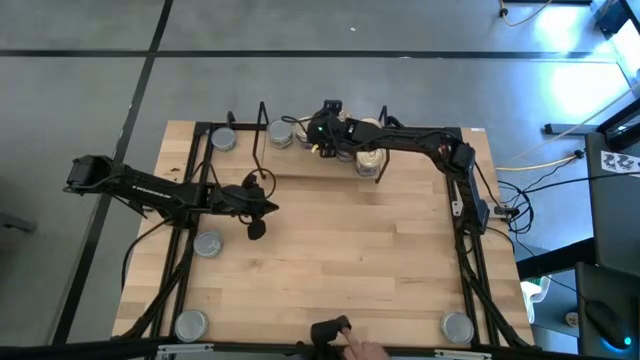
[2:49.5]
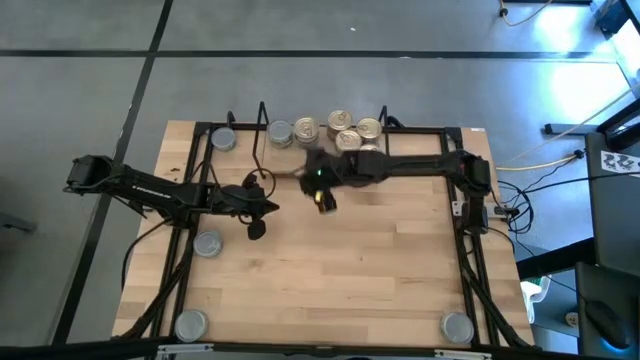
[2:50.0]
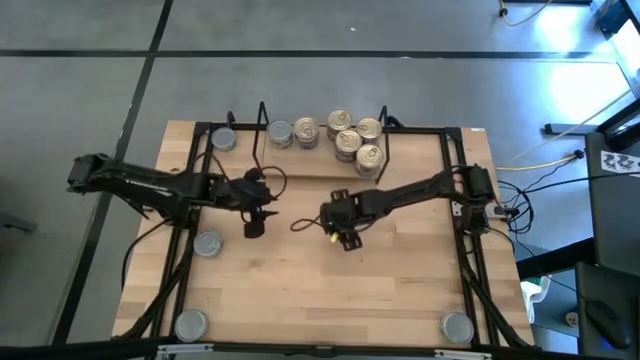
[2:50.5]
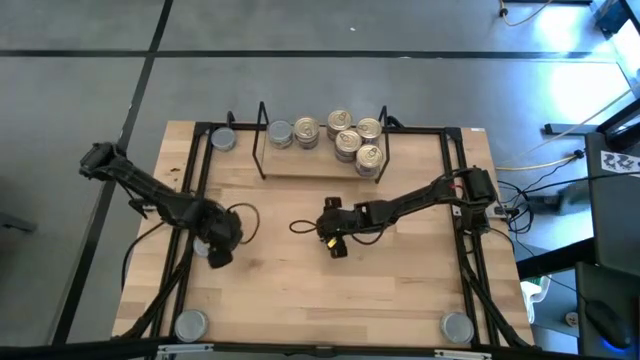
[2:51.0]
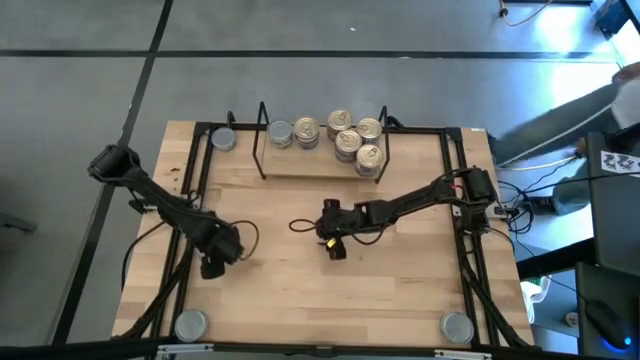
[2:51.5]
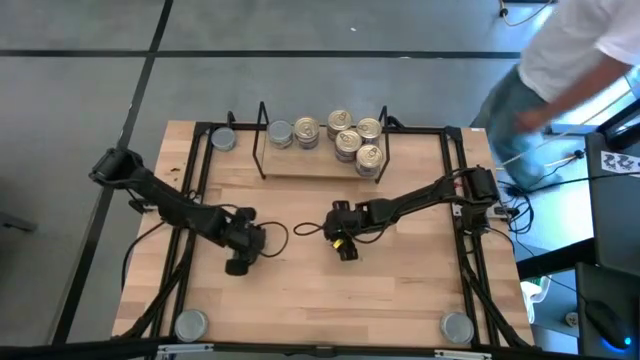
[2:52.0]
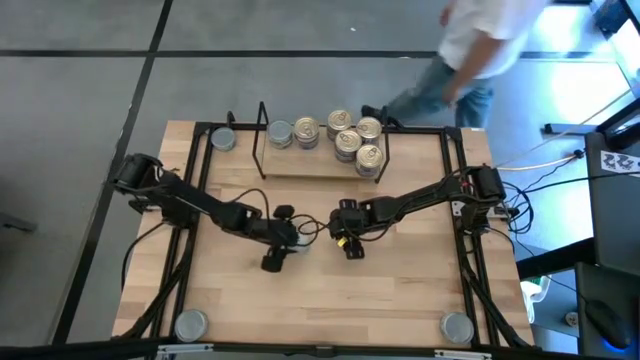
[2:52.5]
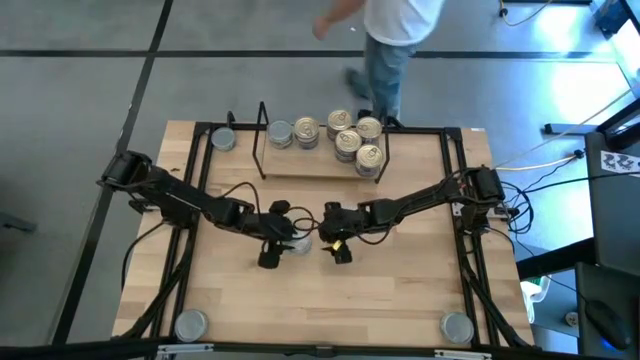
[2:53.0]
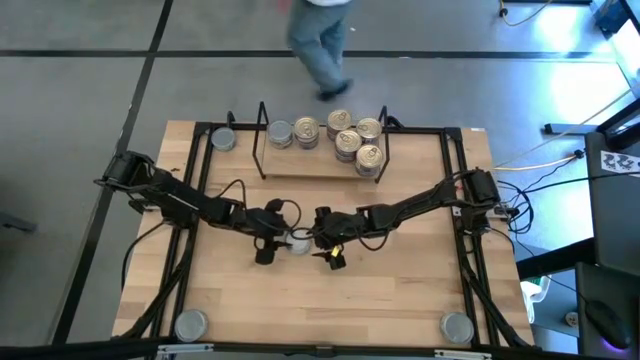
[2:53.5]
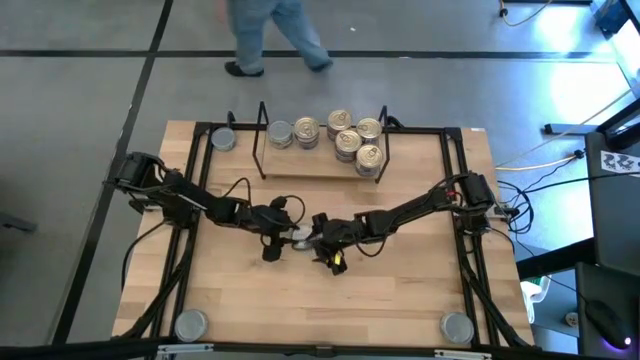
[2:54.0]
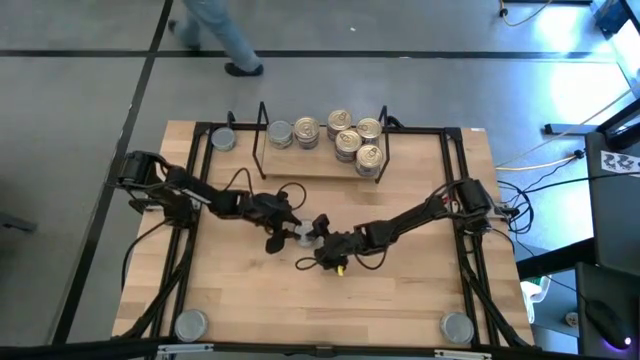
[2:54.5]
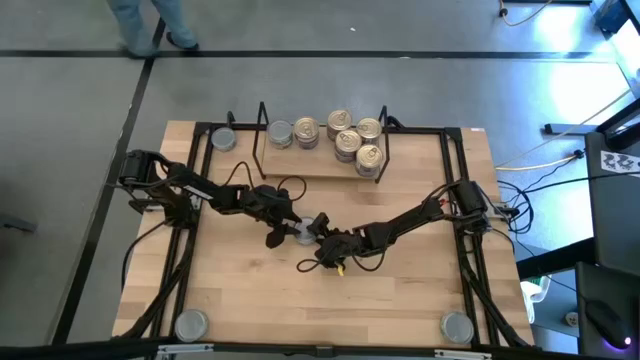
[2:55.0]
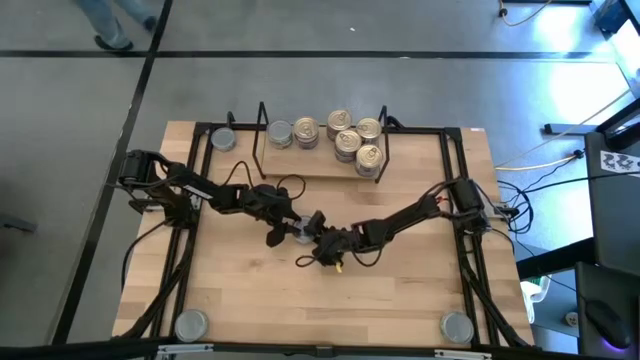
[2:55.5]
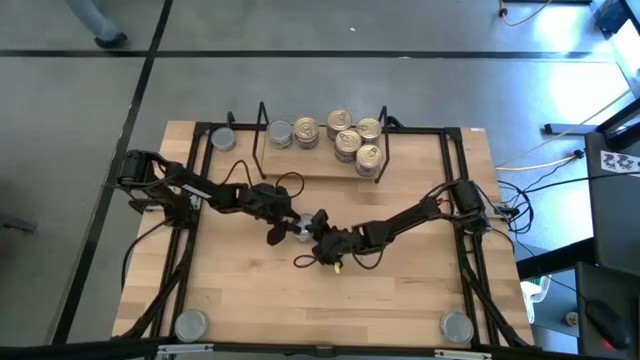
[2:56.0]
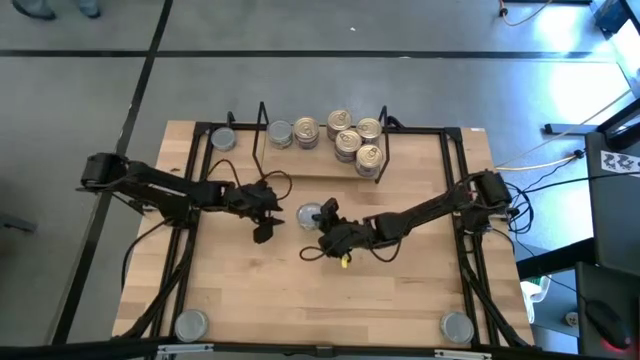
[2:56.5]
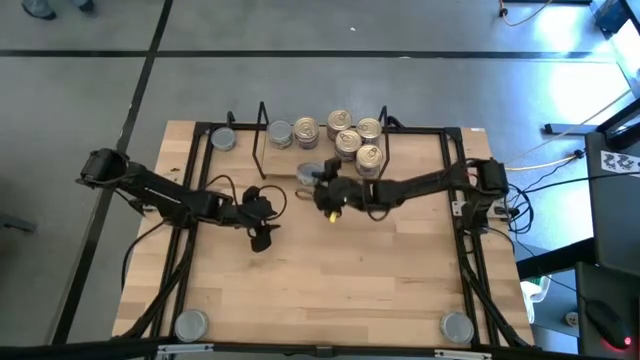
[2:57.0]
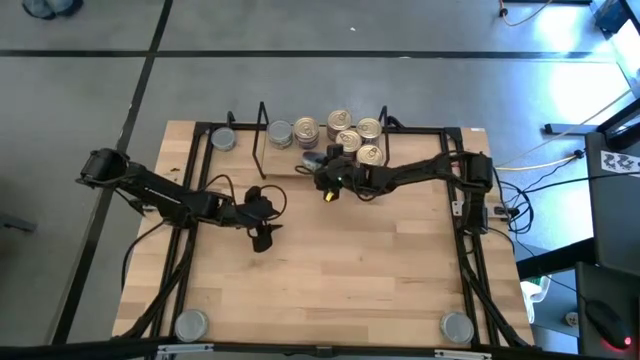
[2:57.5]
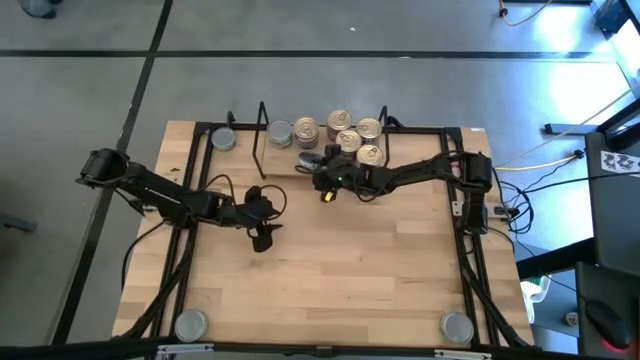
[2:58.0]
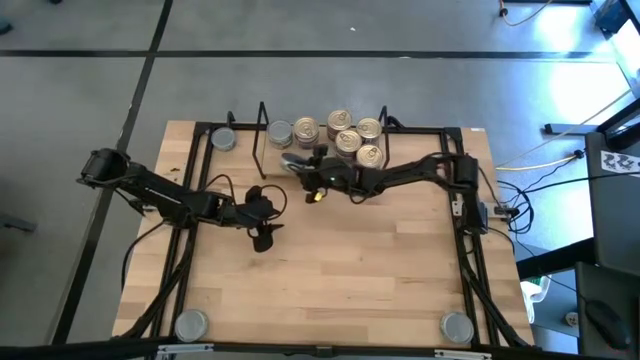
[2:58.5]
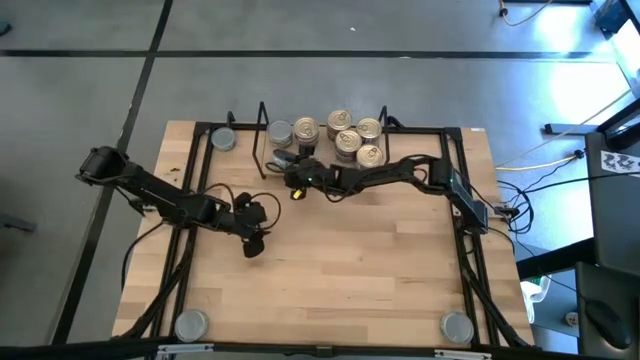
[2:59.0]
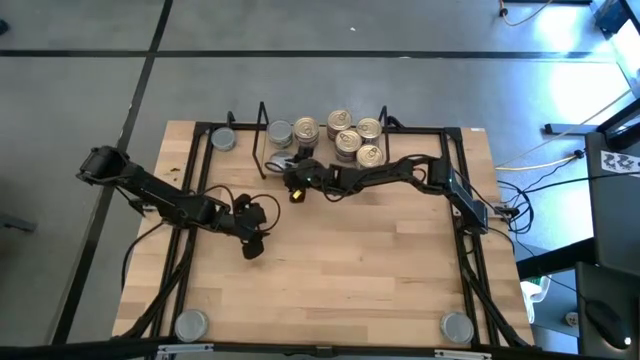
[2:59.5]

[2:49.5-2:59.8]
Task: Stack canned seafood by type on shelf
Put the green tuna can on the shelf

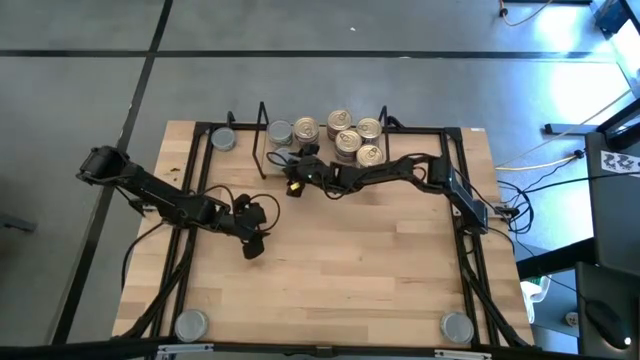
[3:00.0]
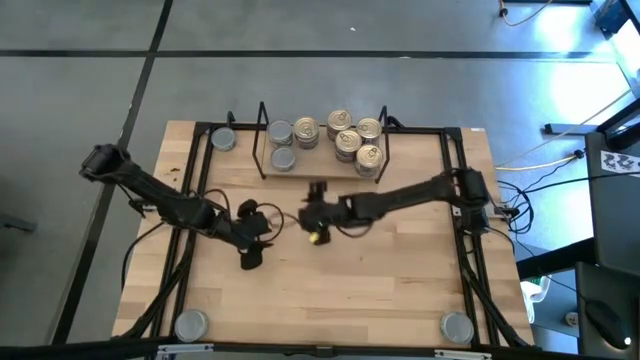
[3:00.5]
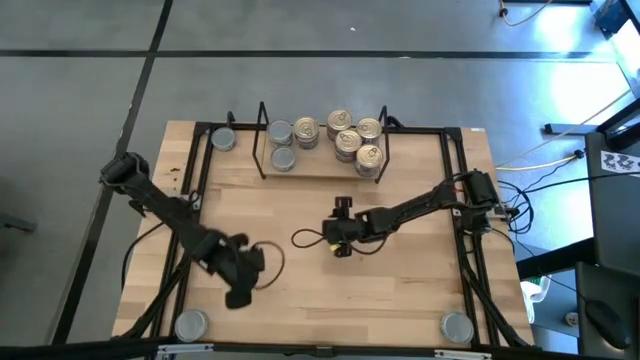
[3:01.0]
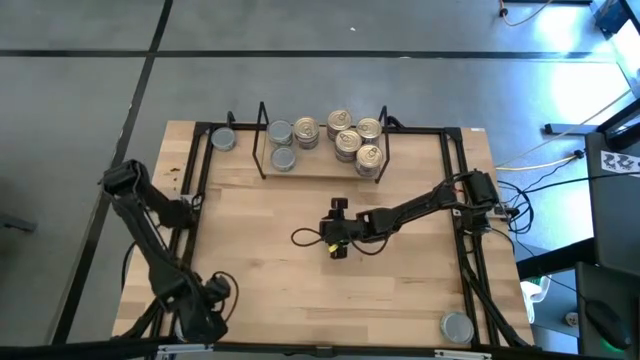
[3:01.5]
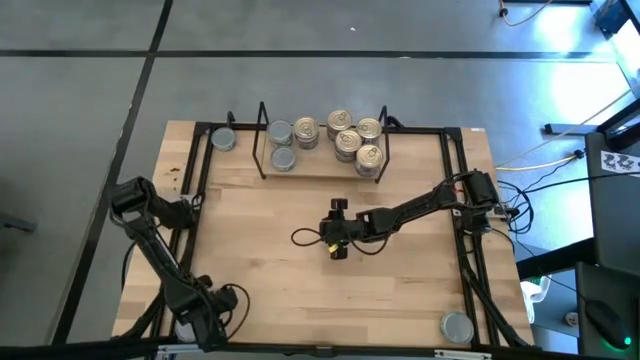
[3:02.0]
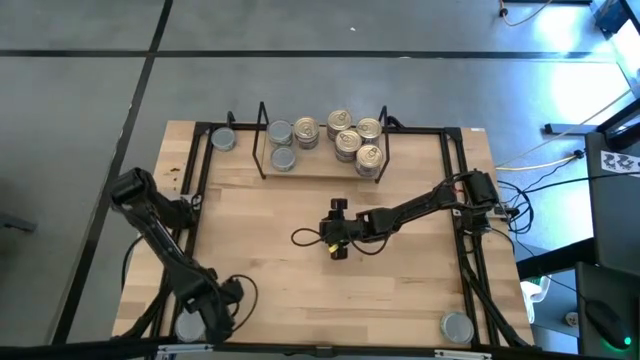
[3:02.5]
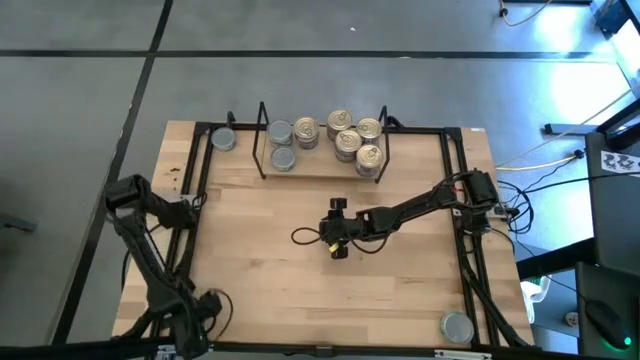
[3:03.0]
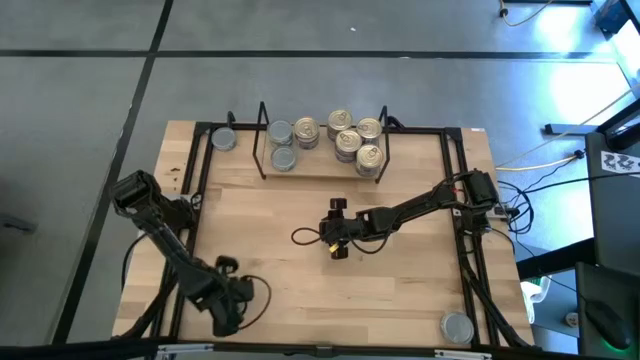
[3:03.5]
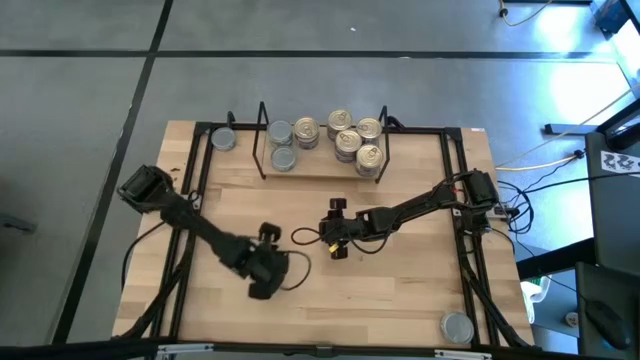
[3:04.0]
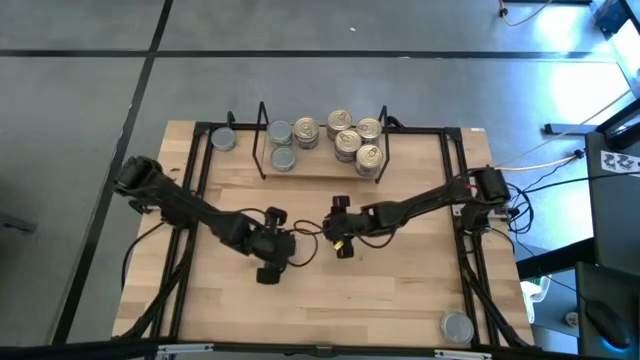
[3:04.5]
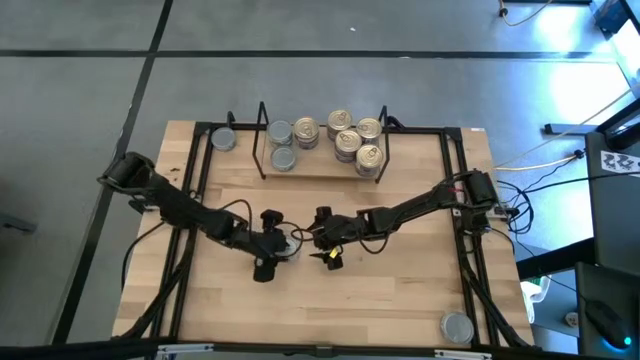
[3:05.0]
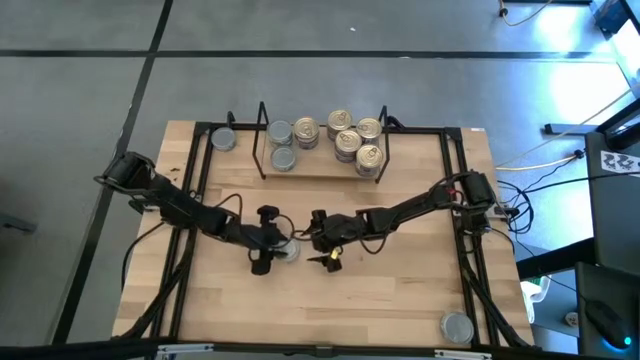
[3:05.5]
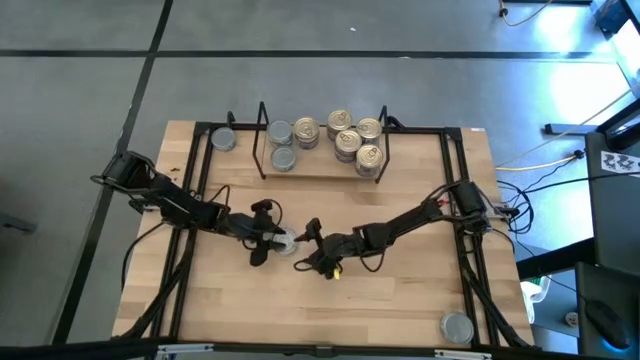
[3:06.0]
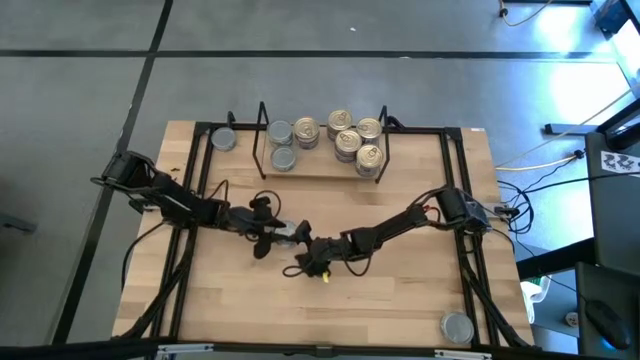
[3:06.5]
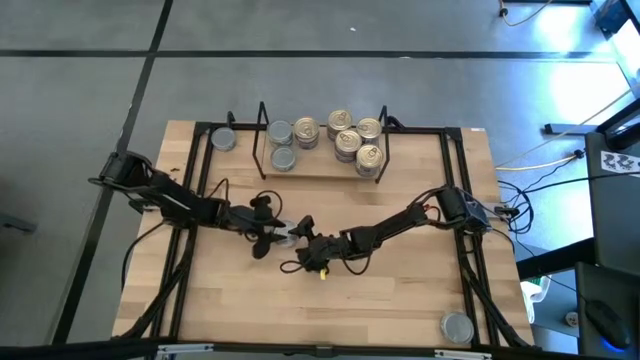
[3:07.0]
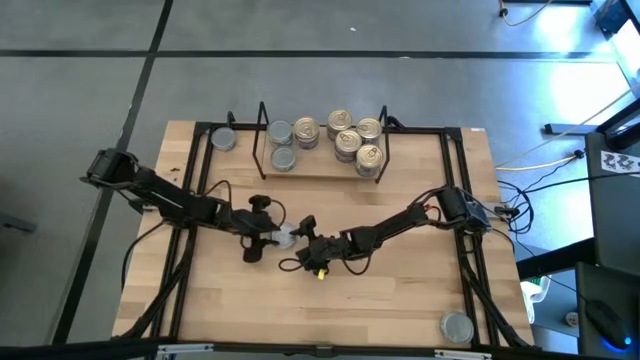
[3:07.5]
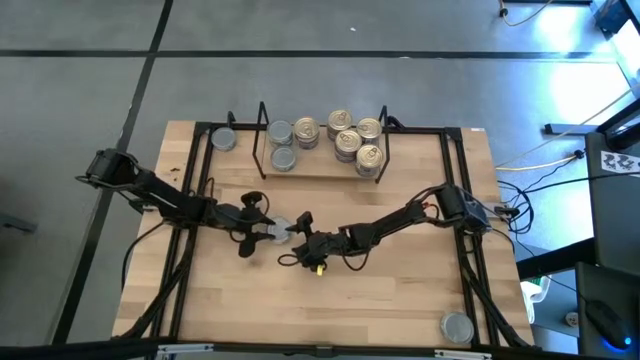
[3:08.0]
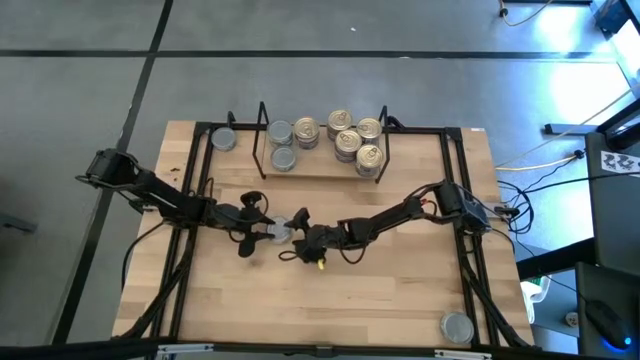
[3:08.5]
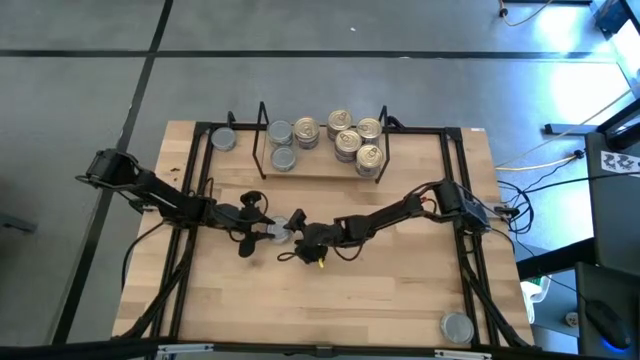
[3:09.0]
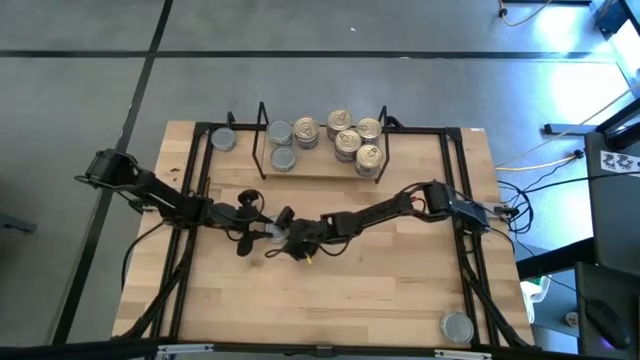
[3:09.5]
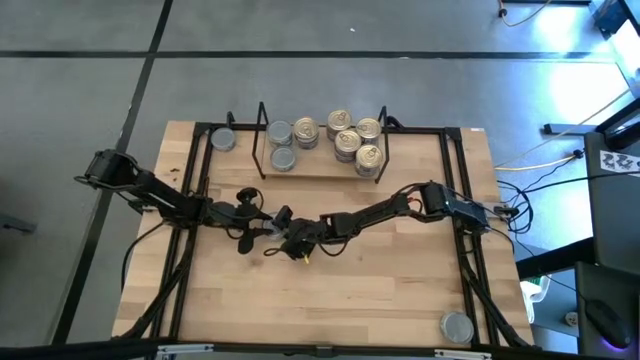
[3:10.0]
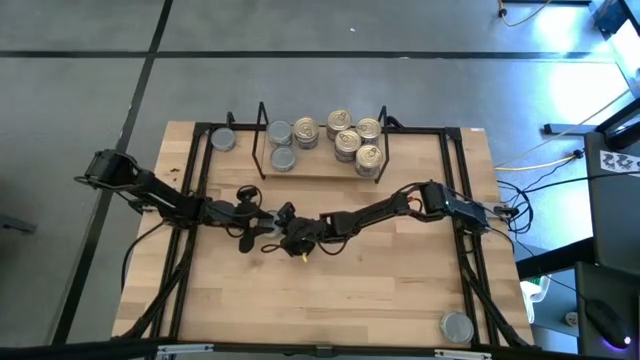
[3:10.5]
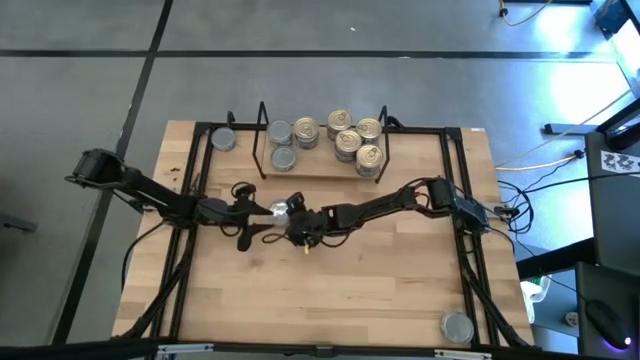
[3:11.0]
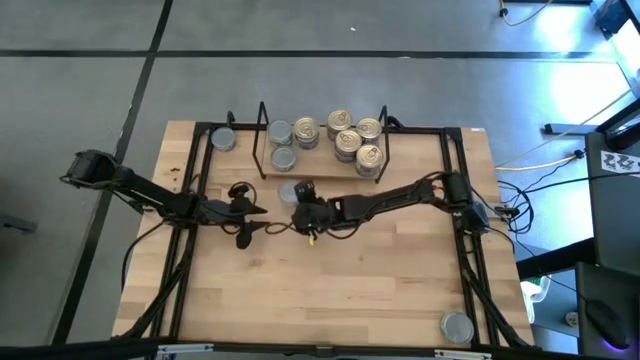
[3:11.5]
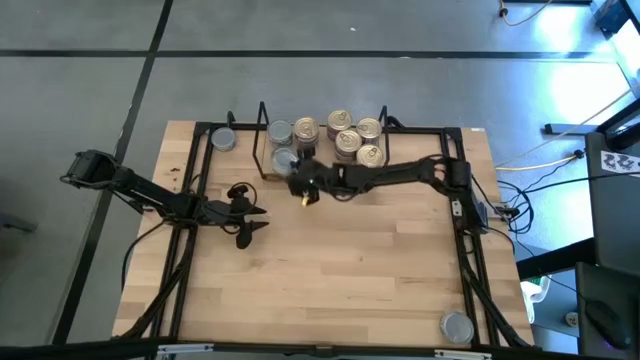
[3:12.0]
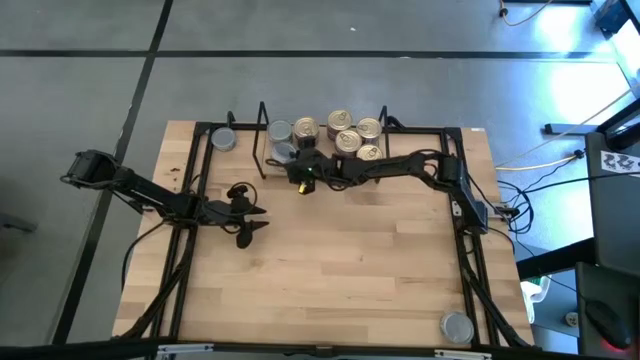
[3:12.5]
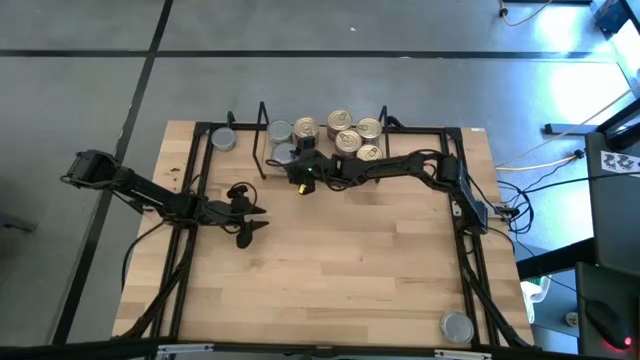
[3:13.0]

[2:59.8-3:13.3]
Stack the green tuna can on top of the other green tuna can on the shelf
